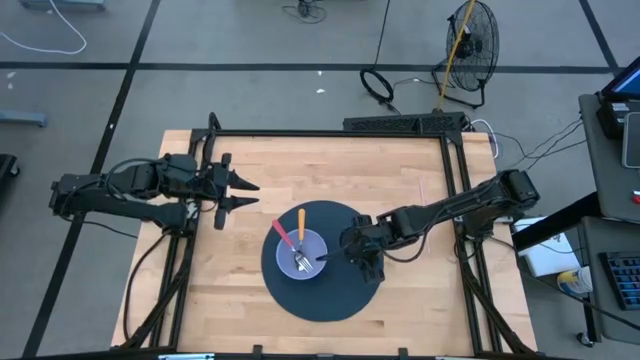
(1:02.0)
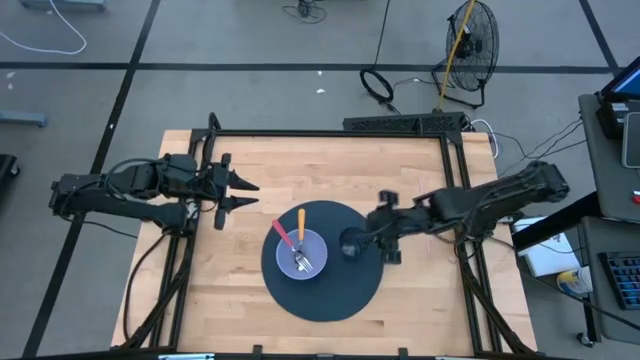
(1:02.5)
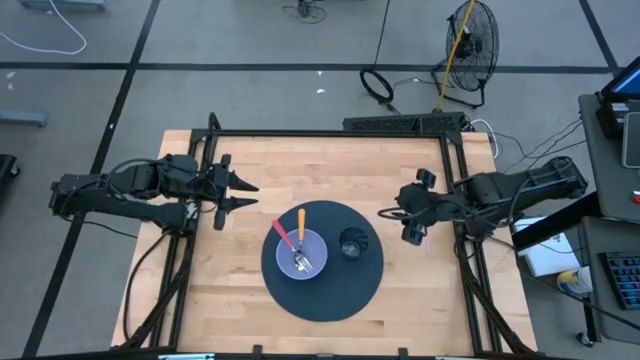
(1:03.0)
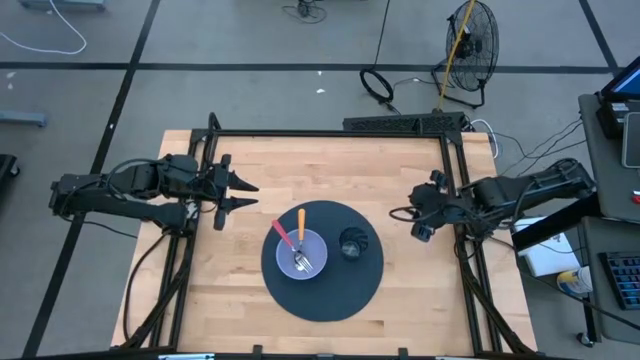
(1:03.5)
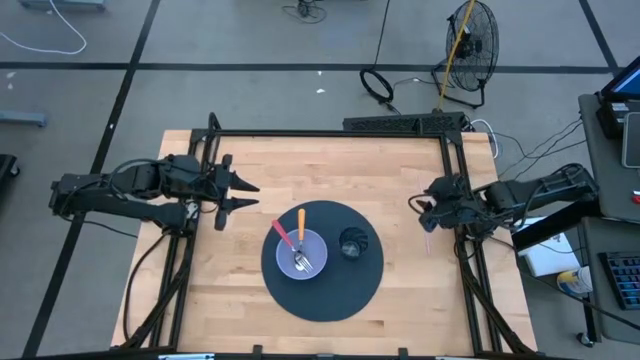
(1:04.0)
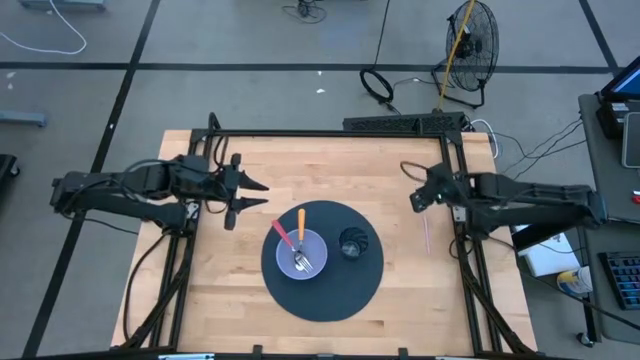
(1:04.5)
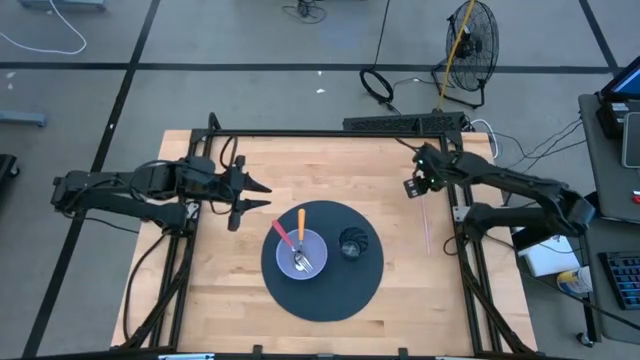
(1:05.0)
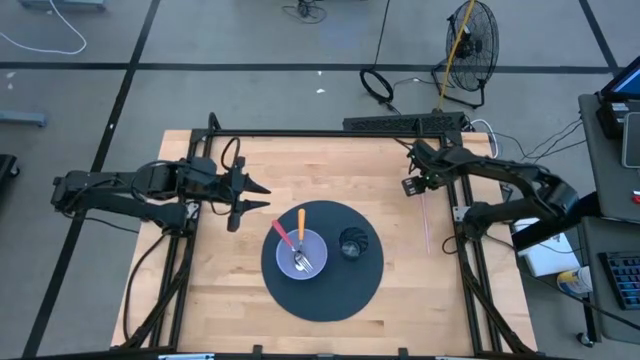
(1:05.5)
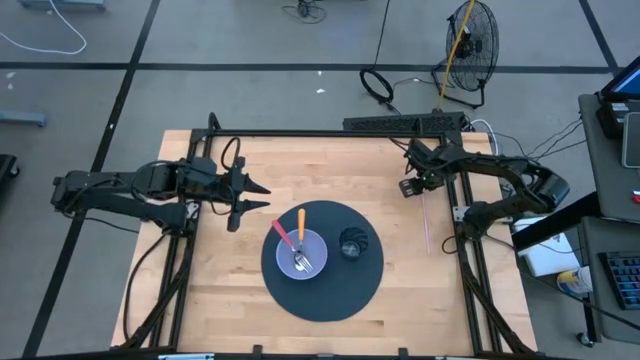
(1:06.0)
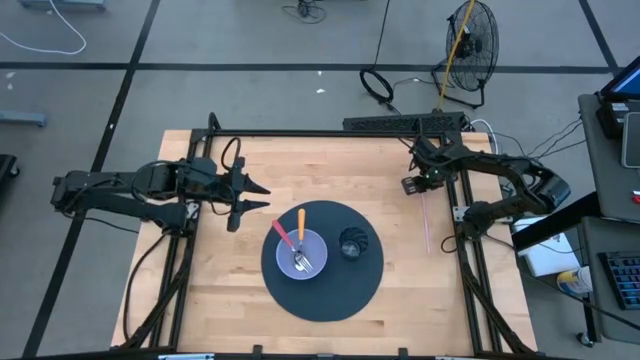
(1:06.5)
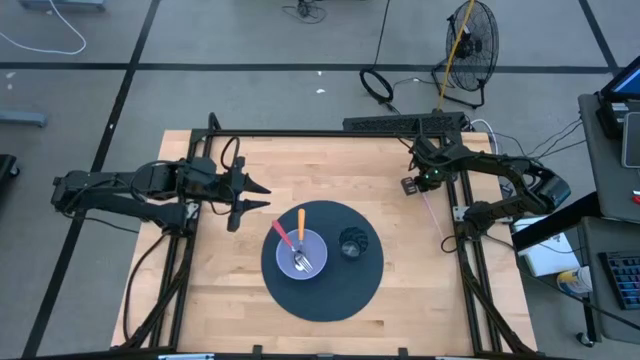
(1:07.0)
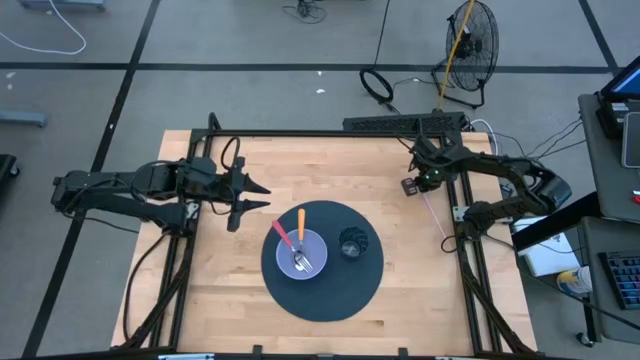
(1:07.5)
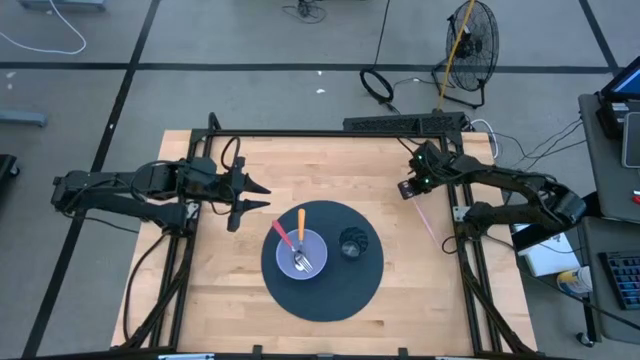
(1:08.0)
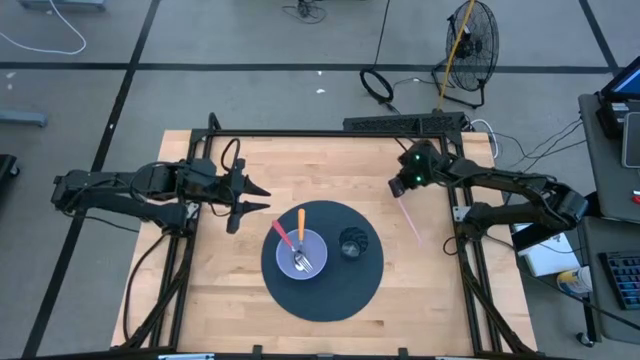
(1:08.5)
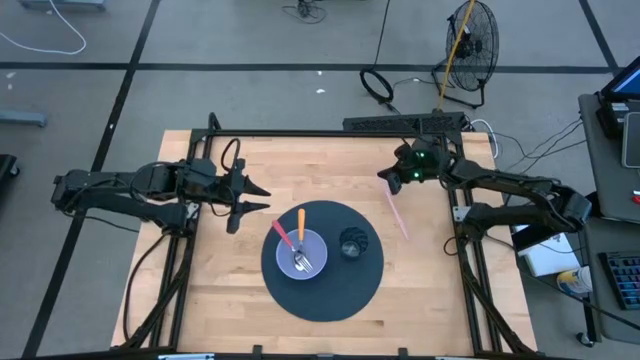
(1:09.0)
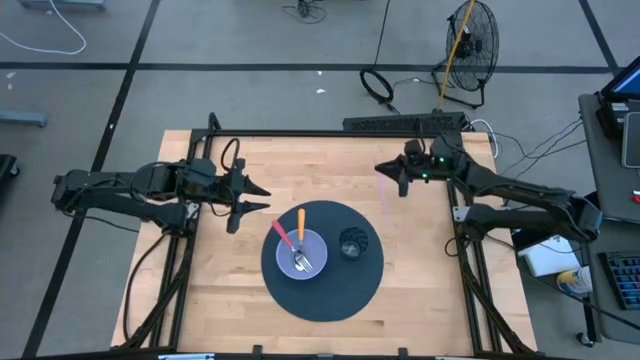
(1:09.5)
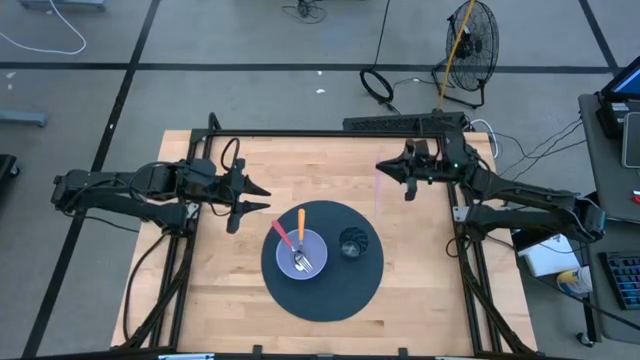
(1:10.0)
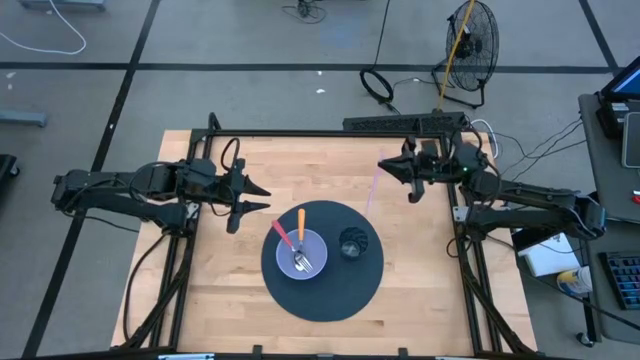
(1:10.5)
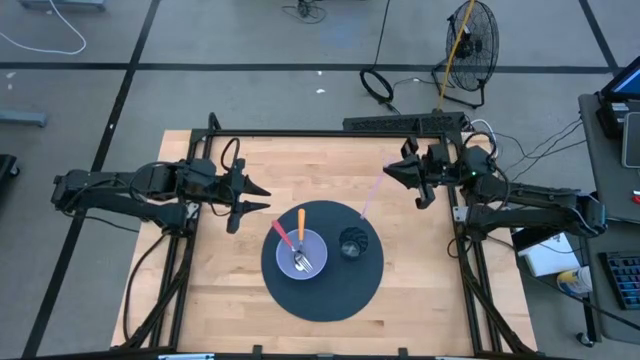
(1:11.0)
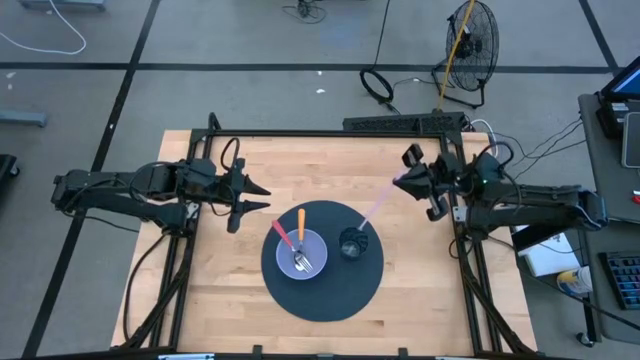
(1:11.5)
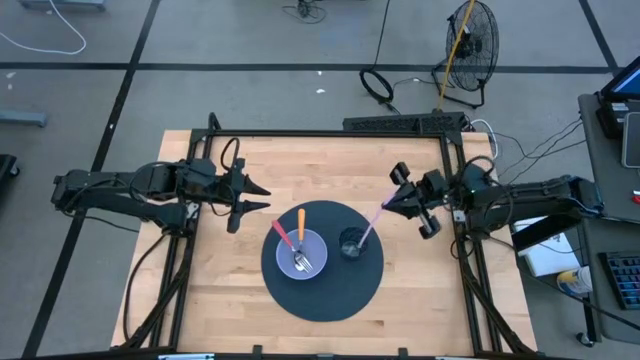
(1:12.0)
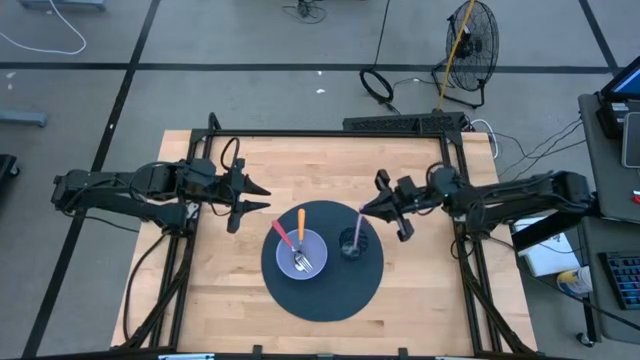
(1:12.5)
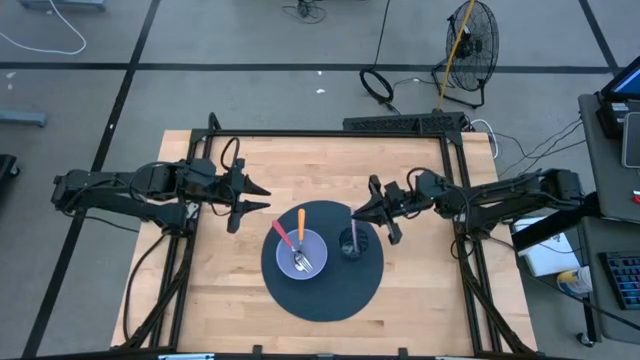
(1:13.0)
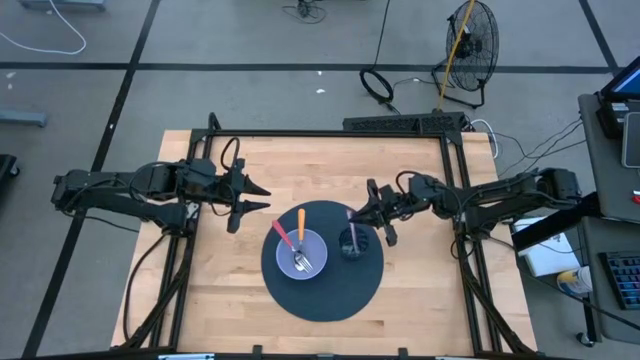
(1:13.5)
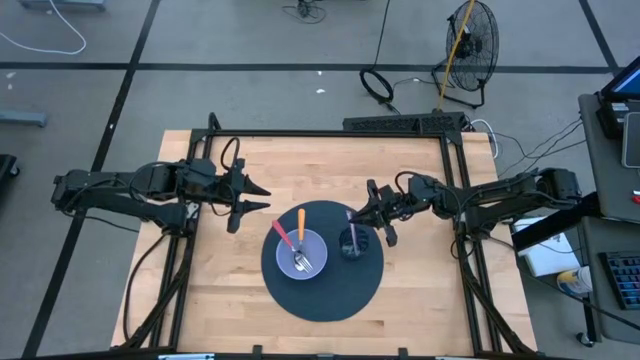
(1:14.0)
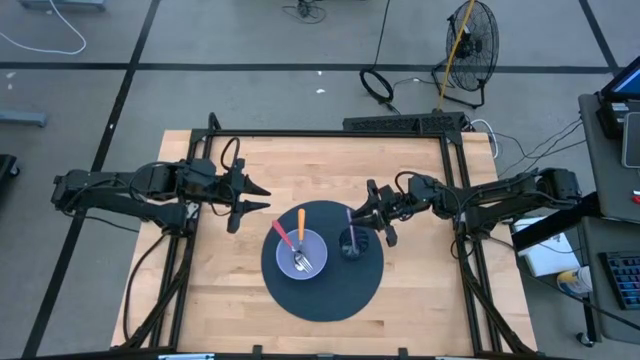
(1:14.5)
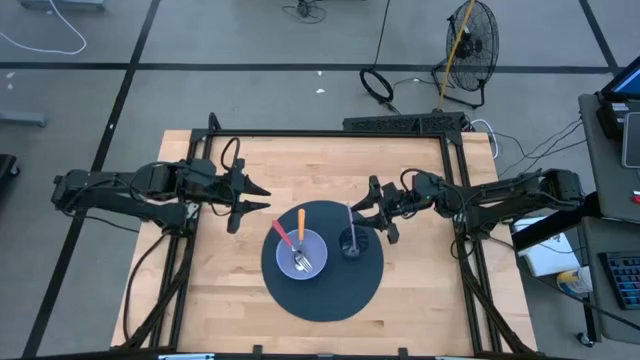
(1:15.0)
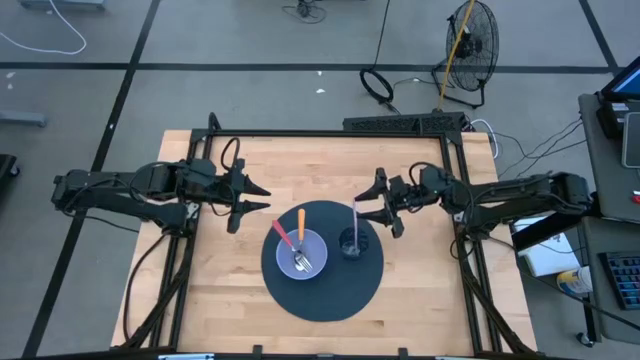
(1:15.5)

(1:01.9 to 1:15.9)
Task: Pick & Place Utensil
Put the pink straw into the blue cup

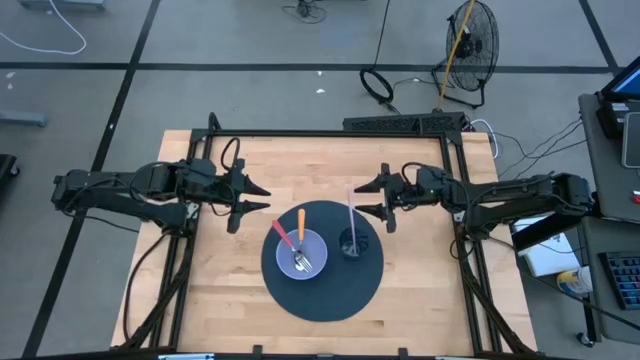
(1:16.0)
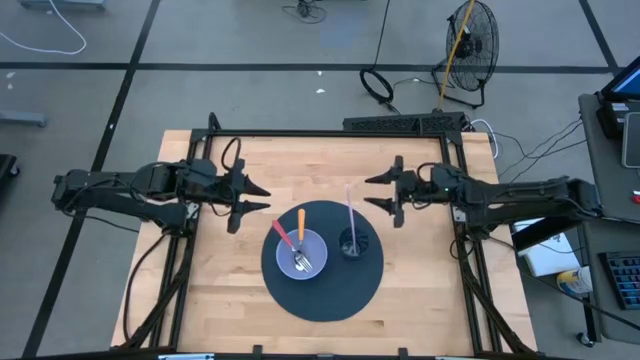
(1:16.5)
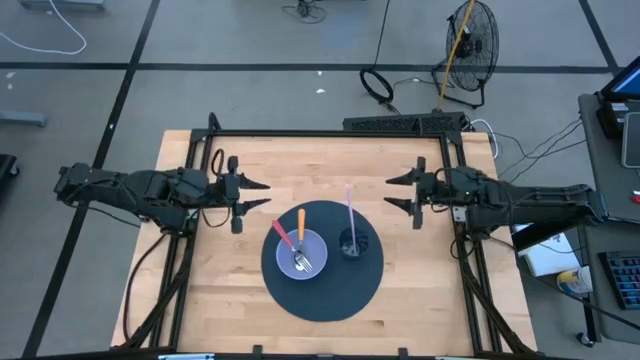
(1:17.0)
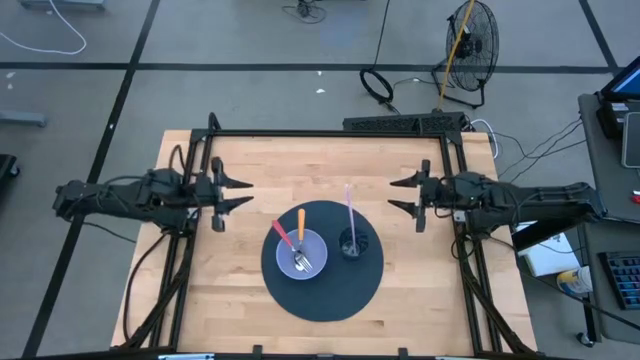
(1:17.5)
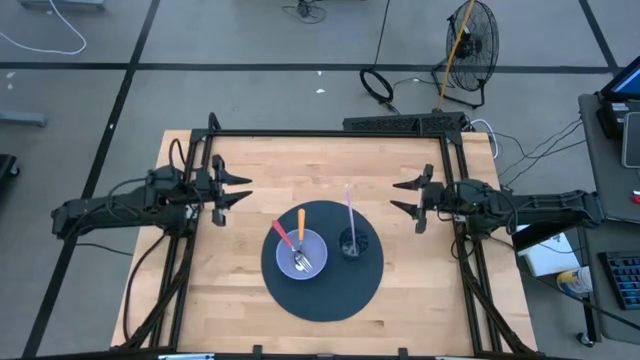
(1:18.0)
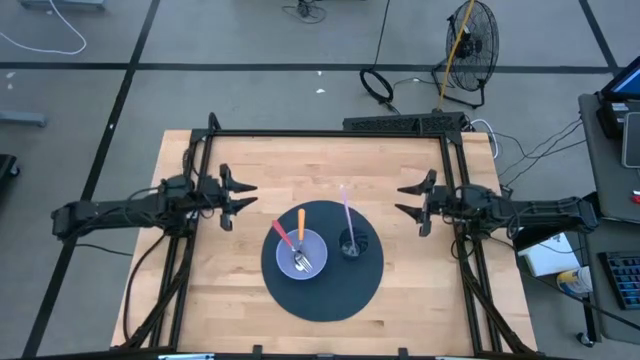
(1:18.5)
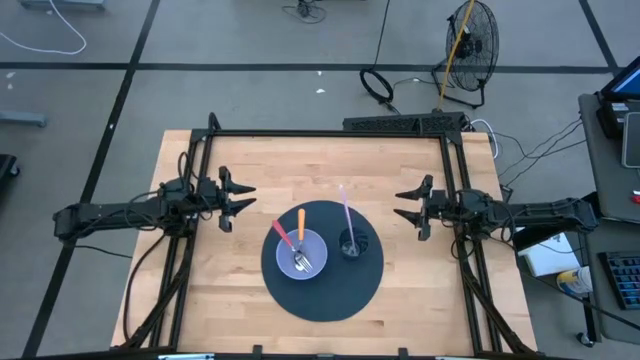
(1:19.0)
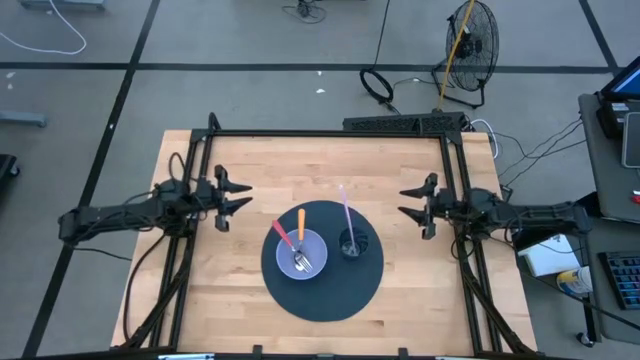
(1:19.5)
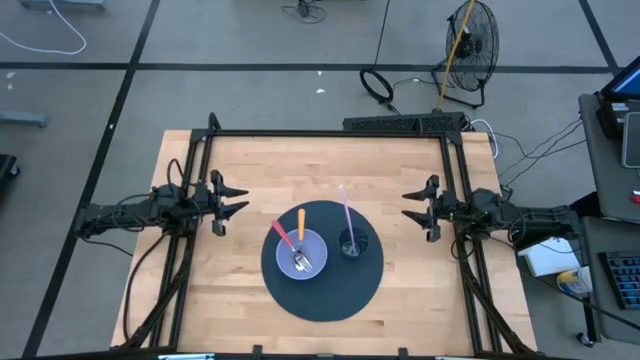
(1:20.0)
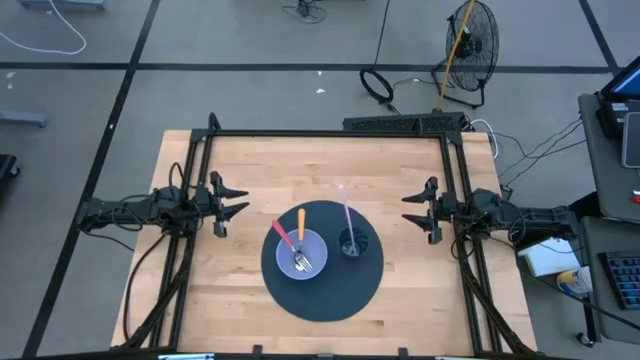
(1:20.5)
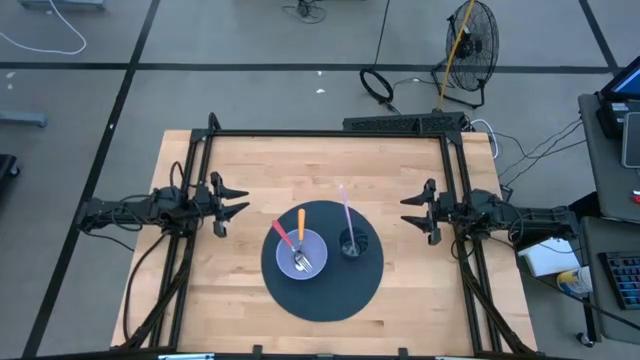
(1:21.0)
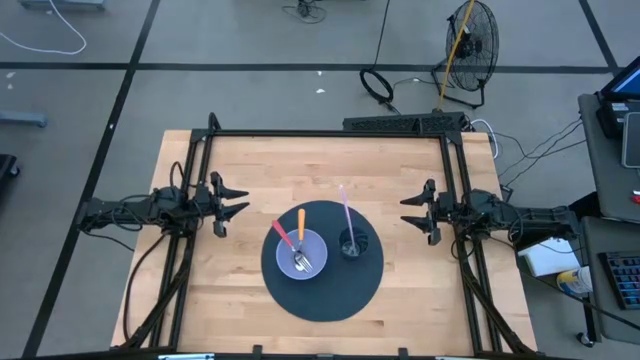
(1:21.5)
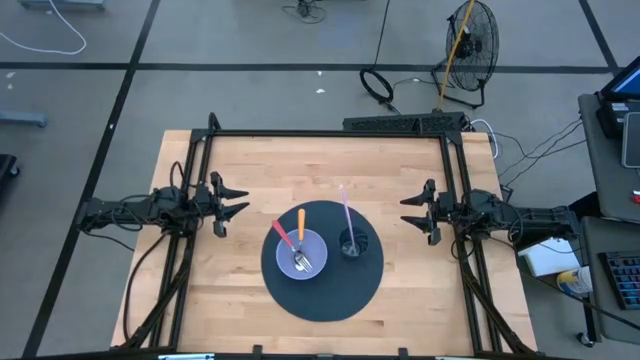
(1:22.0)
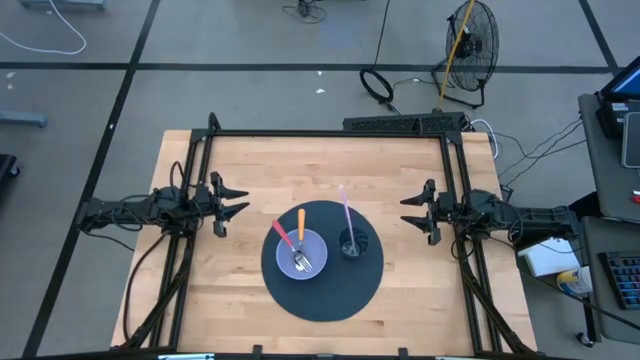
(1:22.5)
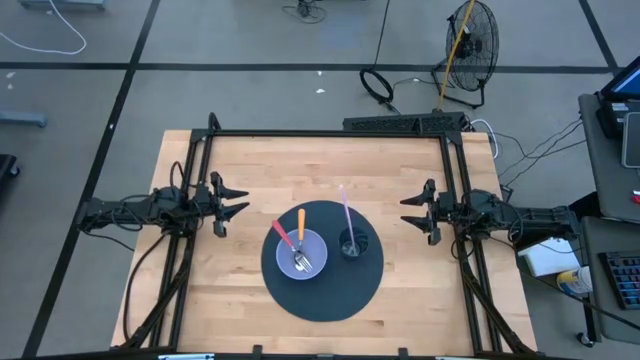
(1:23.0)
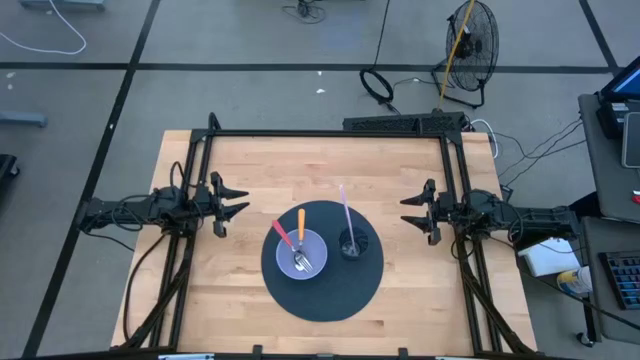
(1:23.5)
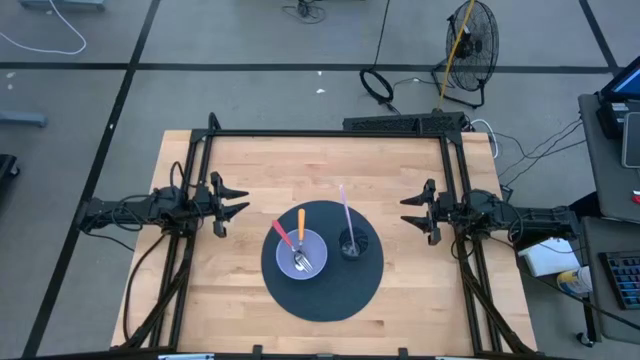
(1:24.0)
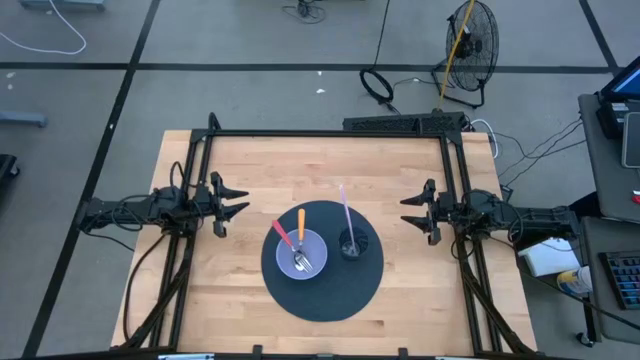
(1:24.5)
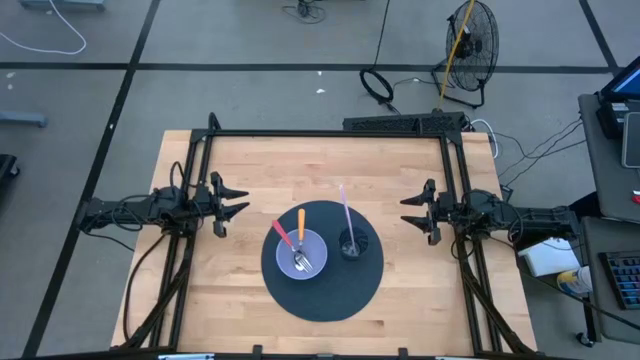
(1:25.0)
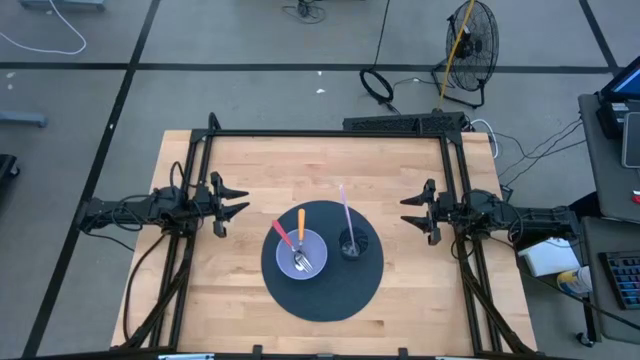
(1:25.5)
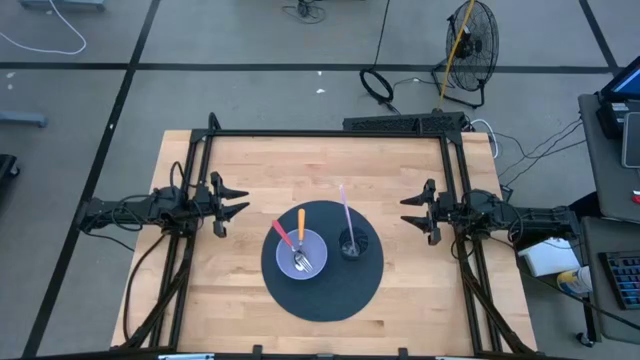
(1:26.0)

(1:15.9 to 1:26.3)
Return to Home Position
